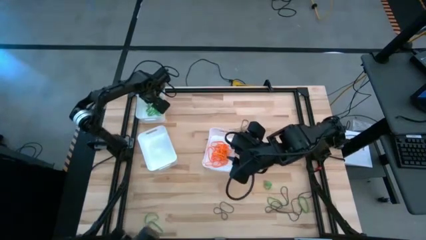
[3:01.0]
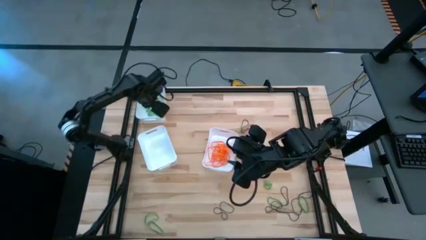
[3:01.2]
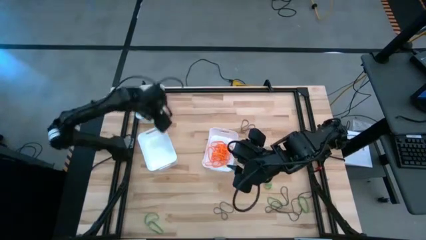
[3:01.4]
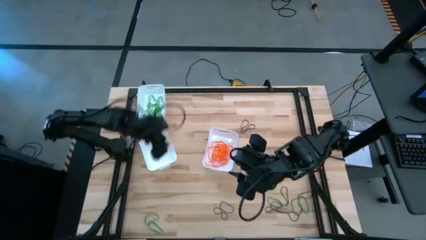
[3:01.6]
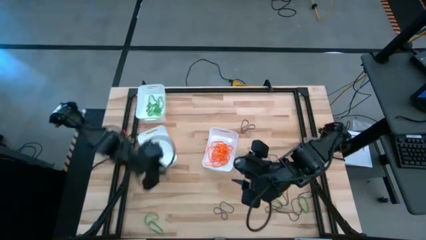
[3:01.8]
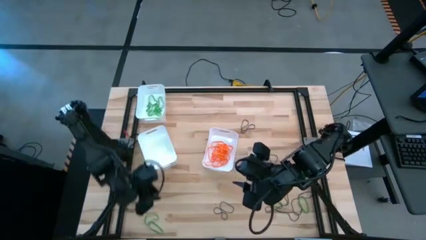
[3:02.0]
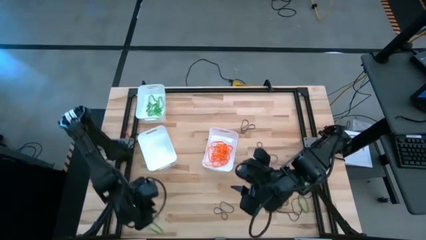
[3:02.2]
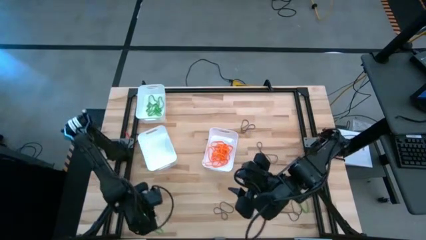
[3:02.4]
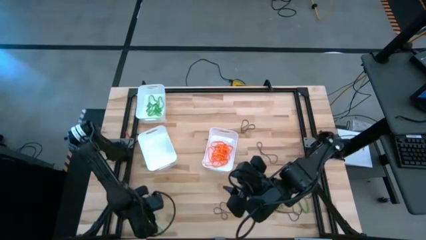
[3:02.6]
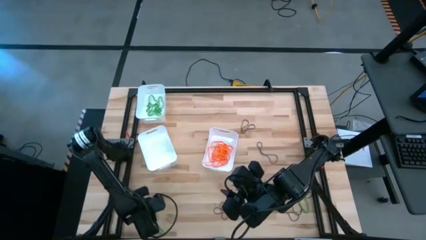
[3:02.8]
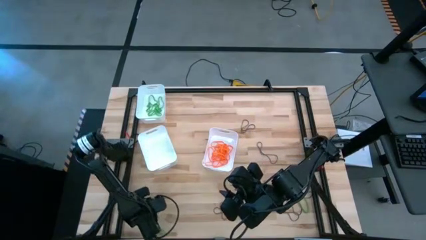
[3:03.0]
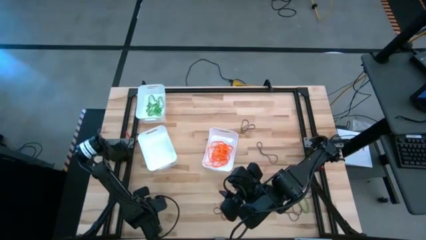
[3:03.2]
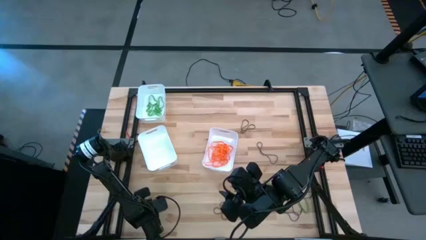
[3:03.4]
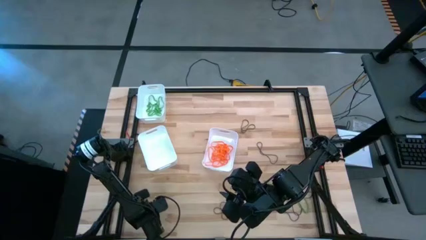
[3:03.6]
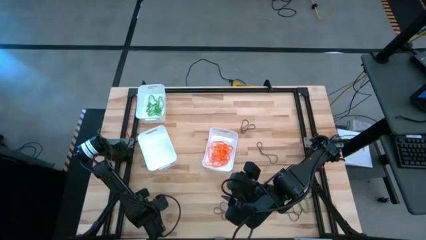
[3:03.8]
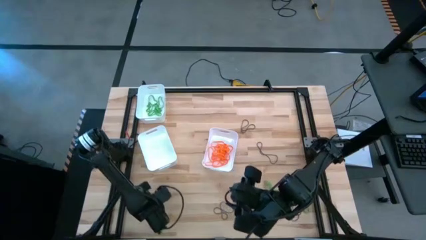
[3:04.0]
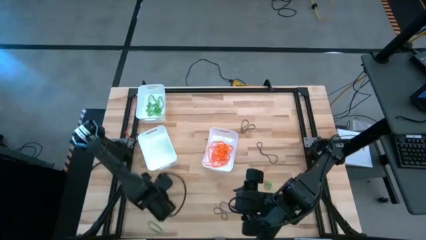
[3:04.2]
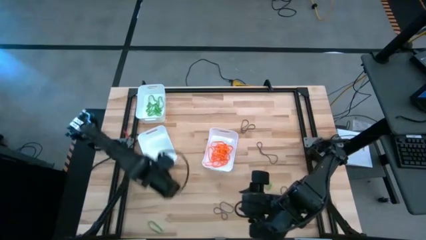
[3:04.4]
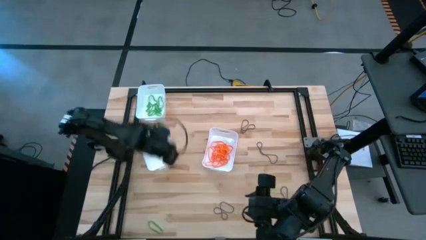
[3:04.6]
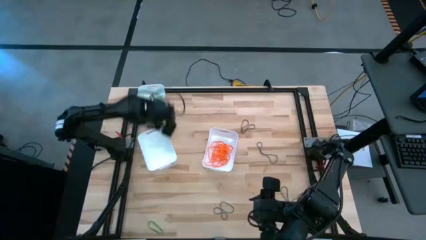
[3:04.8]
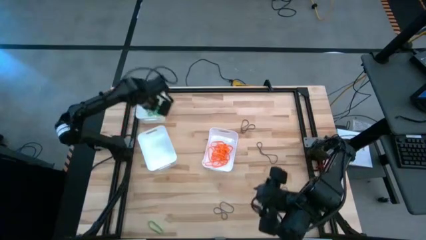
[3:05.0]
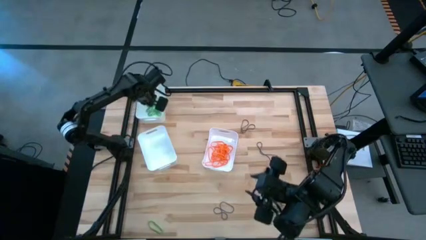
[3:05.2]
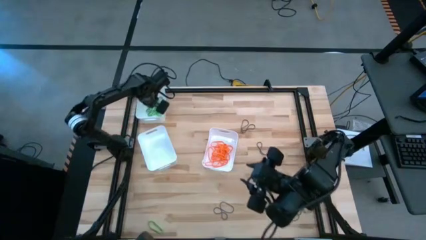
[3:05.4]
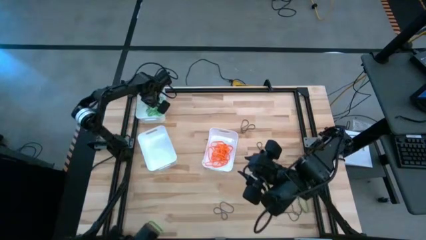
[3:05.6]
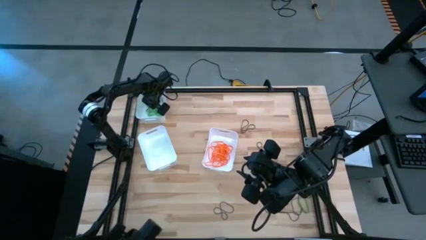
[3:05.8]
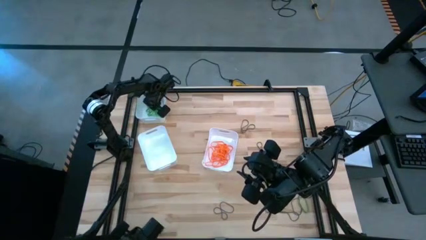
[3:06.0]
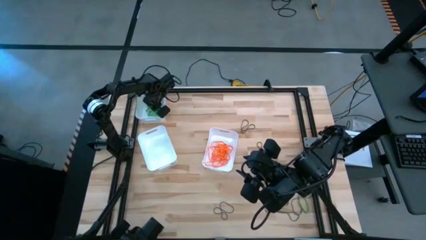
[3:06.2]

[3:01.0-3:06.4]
Task: Sort rubber bands into baskets
Put the green rubber band into the top white bin

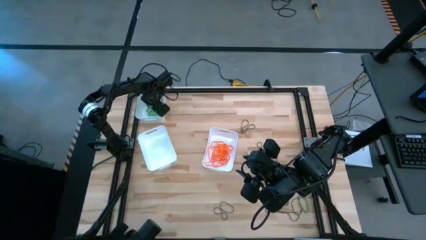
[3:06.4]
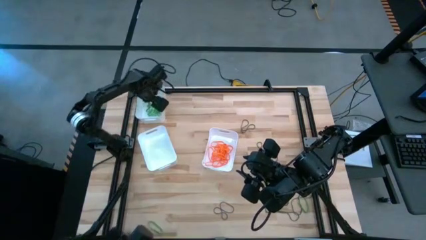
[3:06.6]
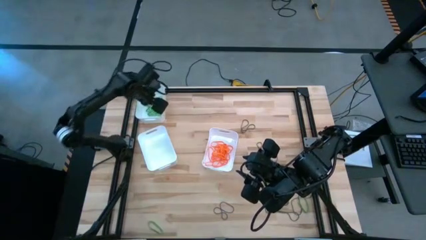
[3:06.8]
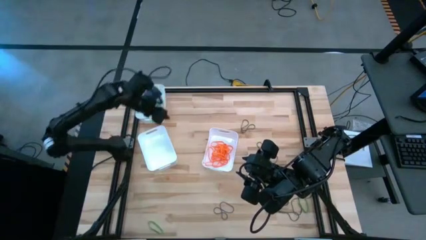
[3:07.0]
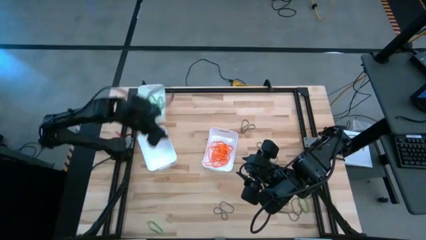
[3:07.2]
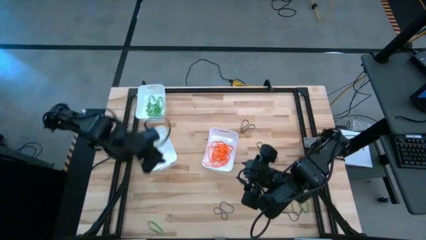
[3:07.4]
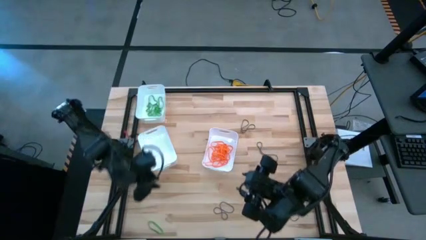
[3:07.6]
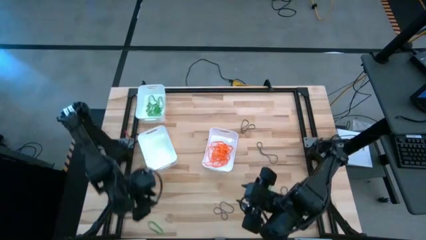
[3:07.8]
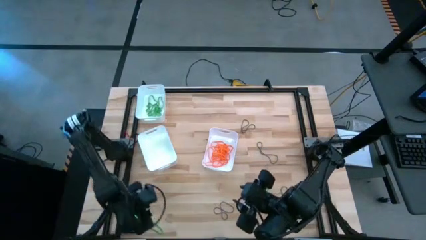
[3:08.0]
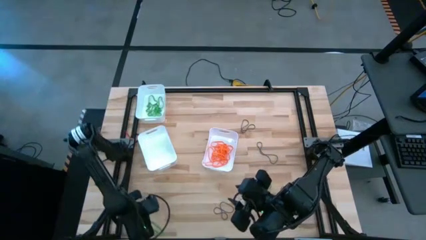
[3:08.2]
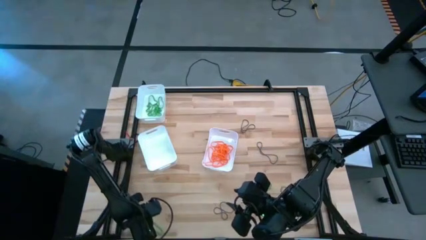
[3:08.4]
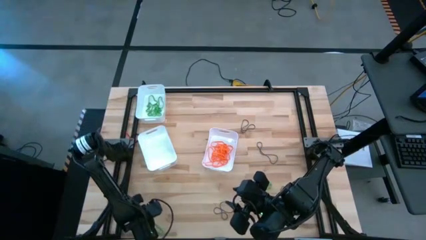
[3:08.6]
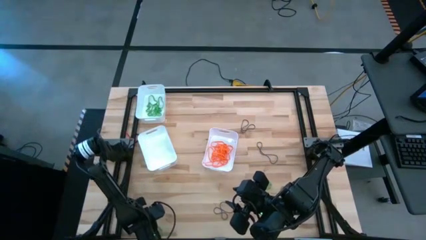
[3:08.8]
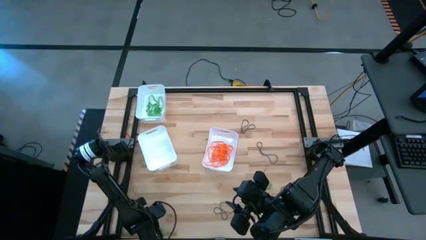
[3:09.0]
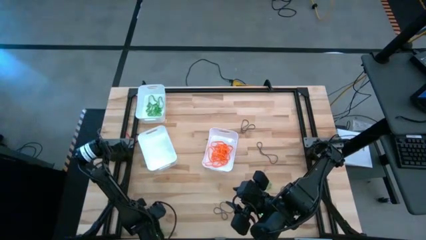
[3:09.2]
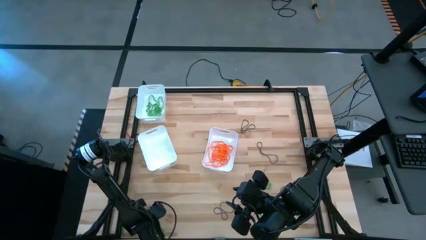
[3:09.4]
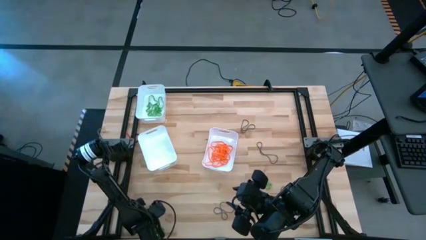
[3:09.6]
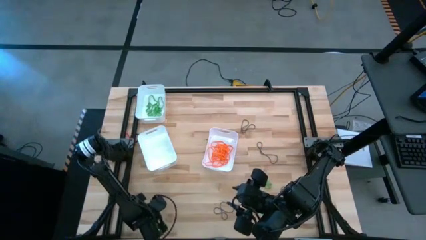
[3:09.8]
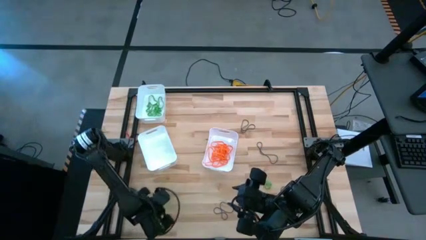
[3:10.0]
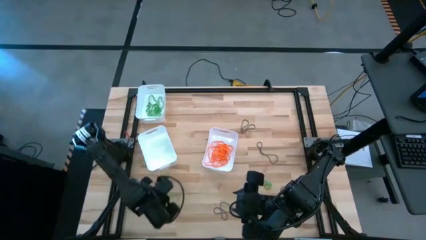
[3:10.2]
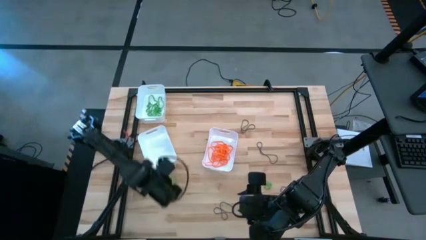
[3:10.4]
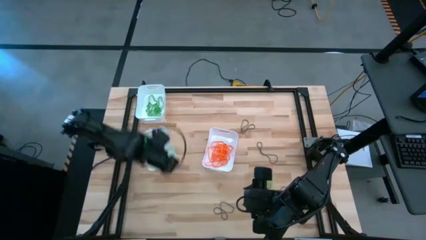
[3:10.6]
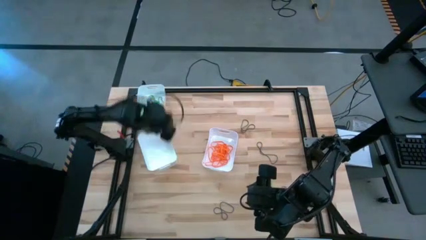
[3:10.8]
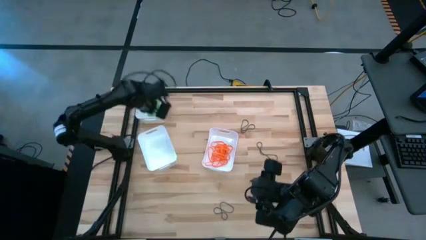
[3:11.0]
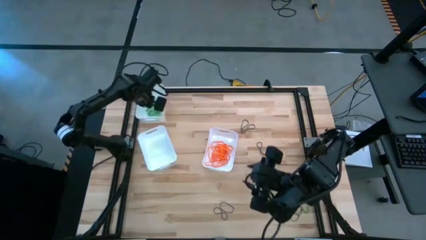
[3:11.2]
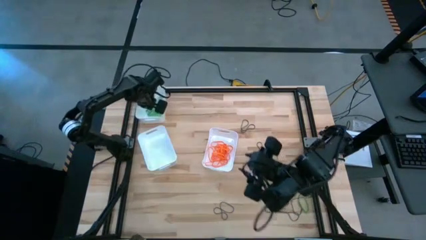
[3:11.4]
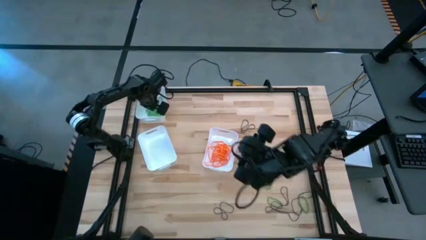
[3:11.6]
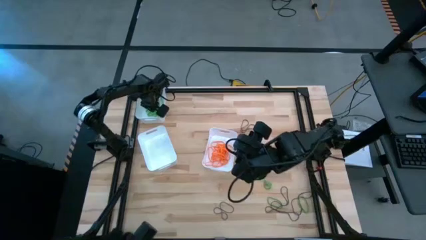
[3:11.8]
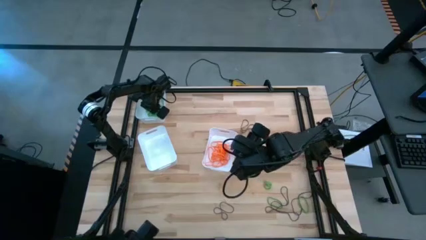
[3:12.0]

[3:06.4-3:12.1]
Put the green rubber band into the top white bin

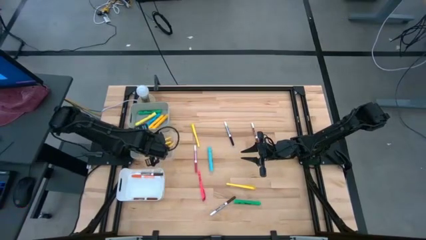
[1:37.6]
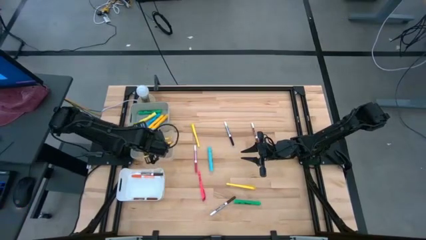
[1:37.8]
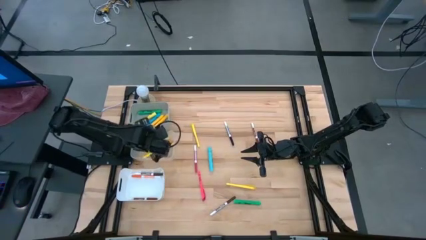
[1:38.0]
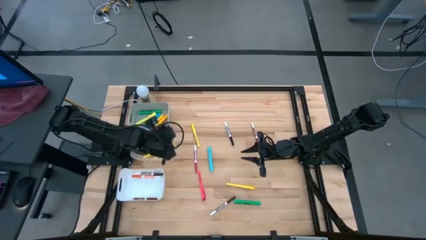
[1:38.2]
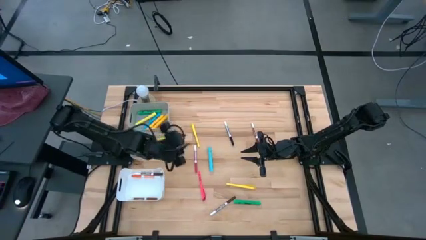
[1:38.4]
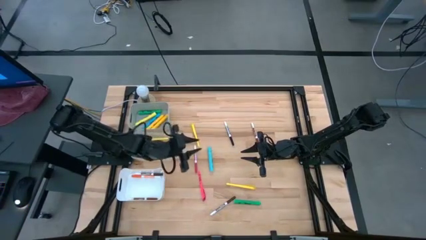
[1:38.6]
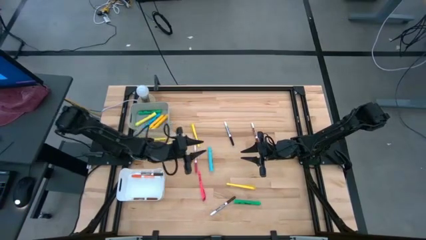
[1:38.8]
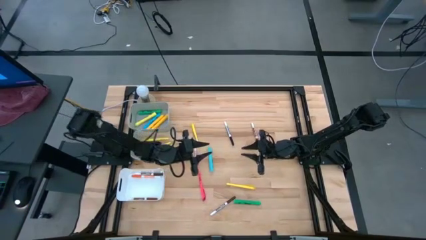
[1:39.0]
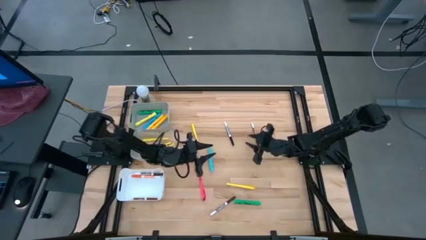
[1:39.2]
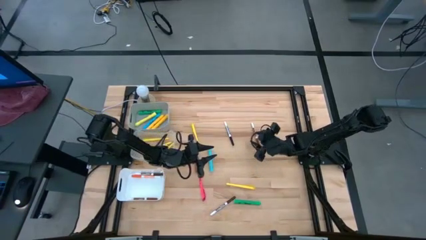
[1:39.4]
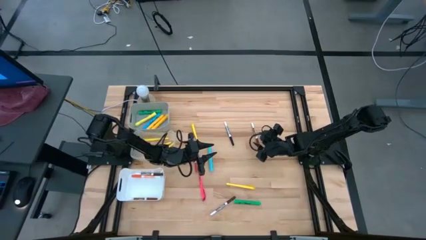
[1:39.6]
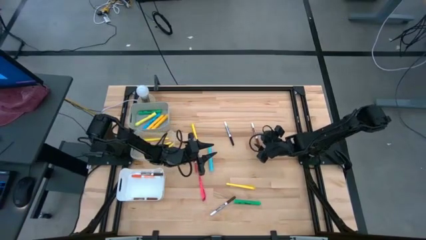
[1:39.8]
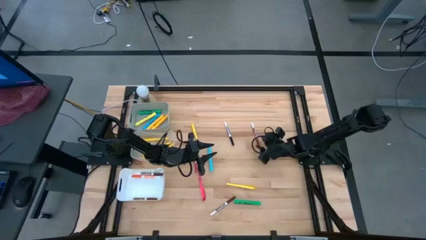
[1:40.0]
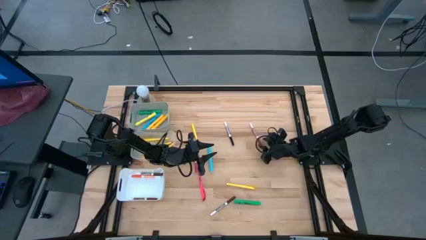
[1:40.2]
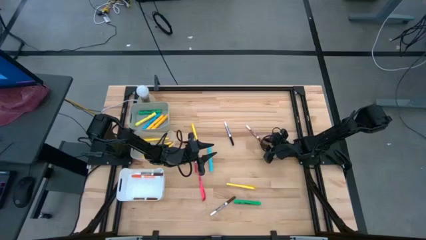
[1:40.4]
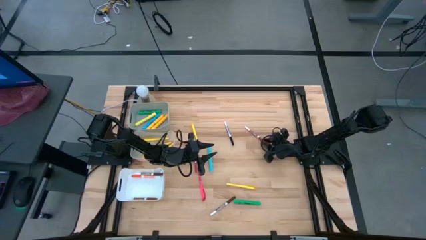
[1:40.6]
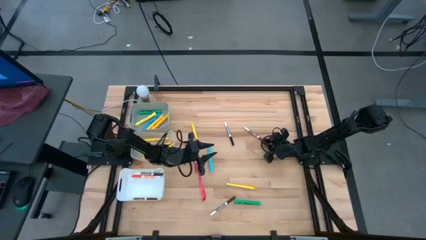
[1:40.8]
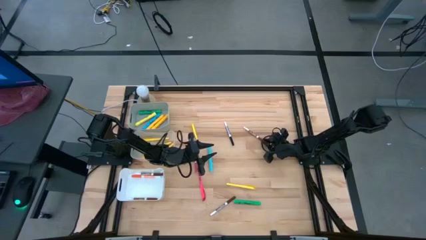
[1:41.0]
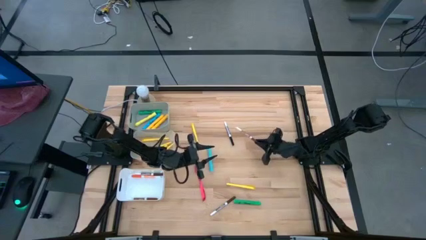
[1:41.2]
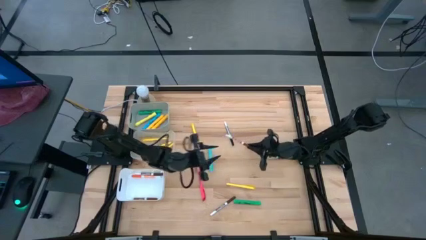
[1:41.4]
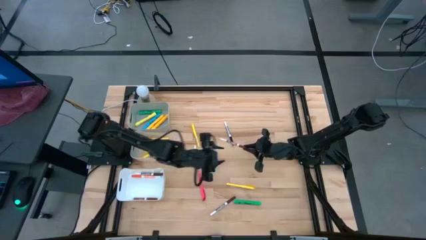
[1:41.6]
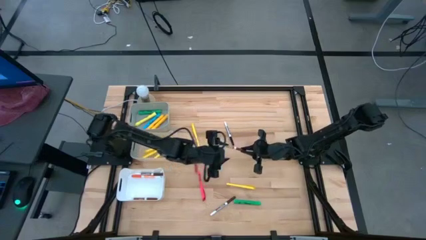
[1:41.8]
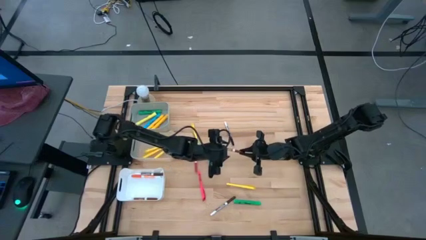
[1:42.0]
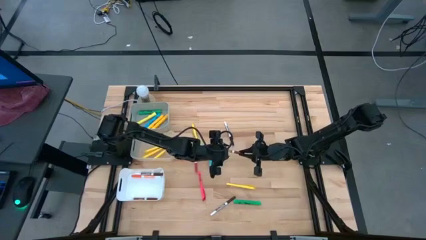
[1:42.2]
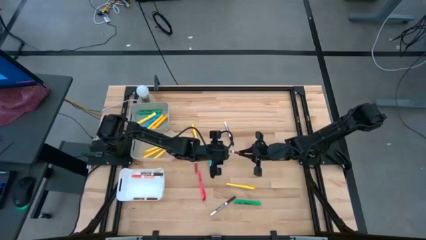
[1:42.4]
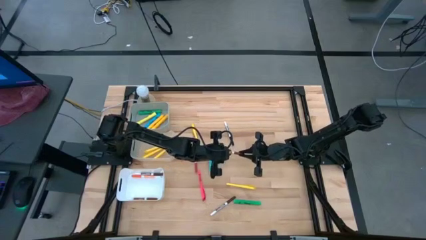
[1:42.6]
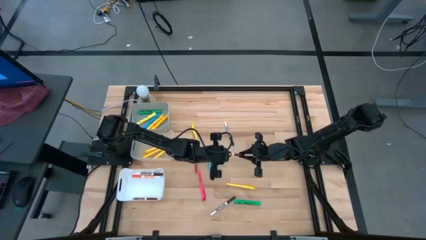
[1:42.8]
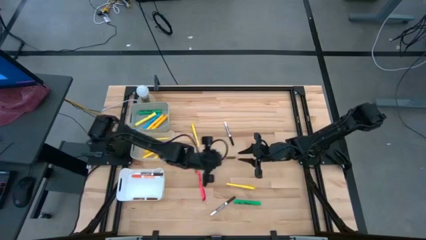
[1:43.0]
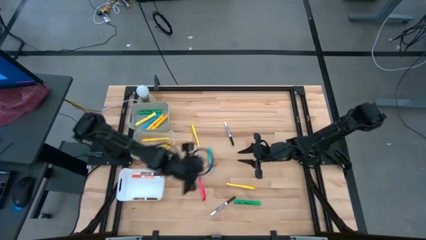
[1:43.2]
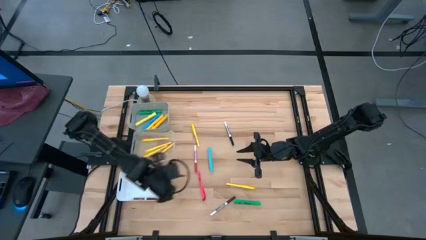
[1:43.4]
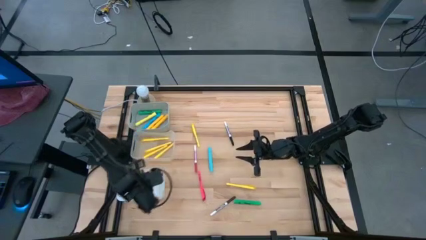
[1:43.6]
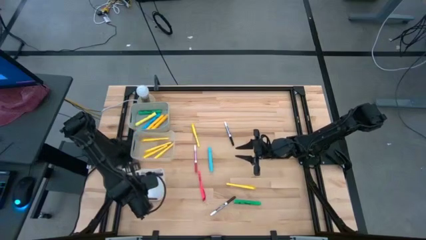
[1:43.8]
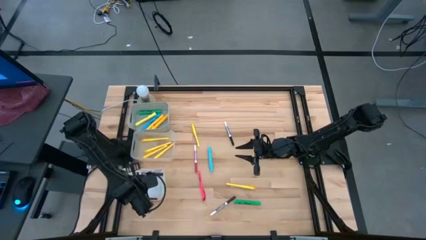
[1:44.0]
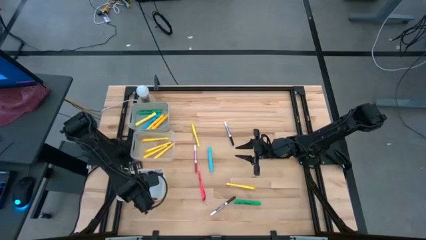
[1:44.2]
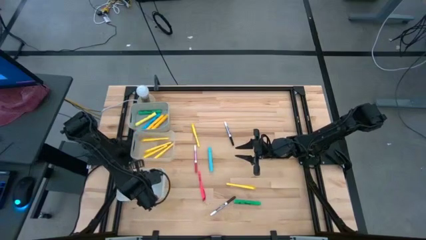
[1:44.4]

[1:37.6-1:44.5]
Task: Pick & Place Markers
Put the brown marker into the white bin
